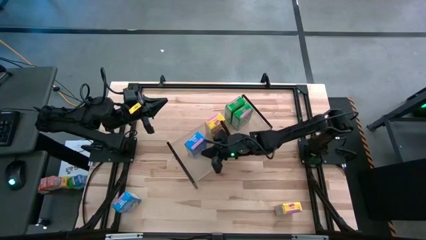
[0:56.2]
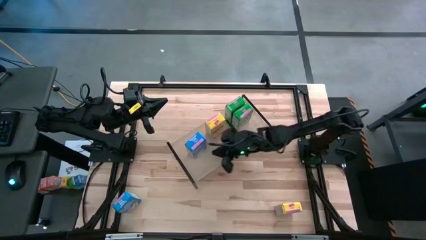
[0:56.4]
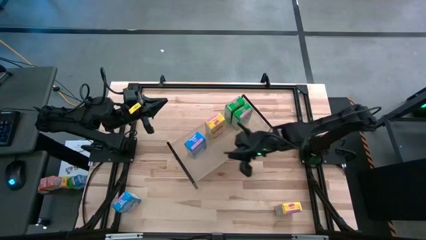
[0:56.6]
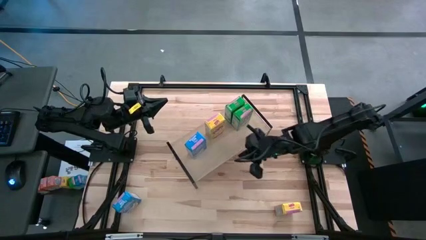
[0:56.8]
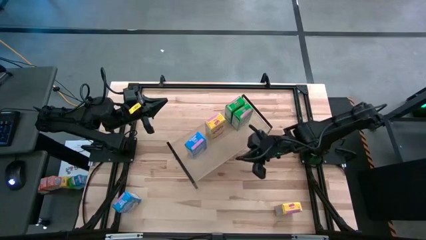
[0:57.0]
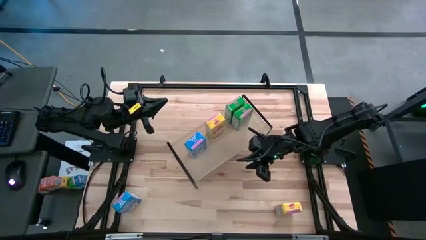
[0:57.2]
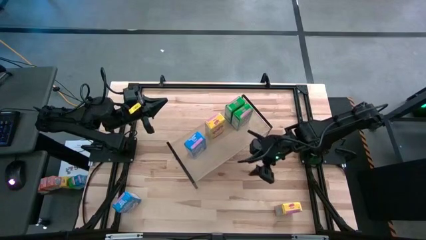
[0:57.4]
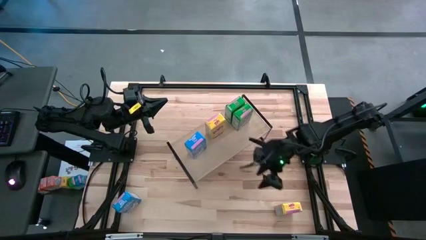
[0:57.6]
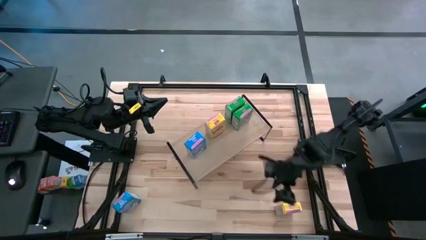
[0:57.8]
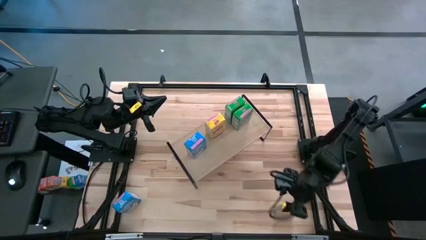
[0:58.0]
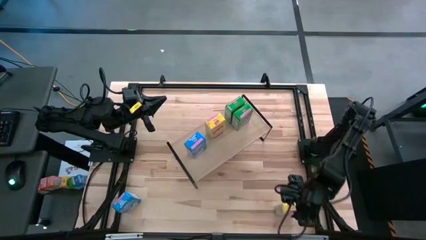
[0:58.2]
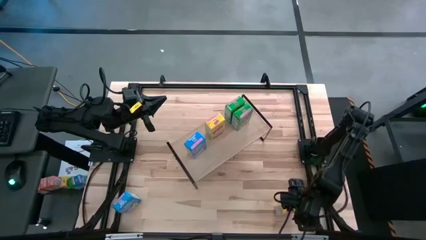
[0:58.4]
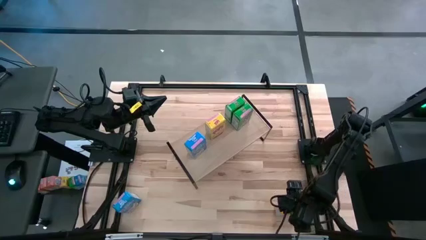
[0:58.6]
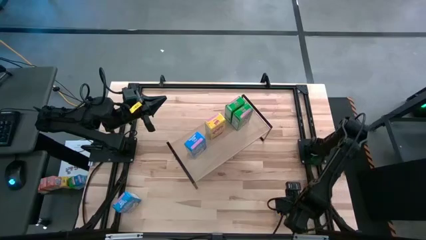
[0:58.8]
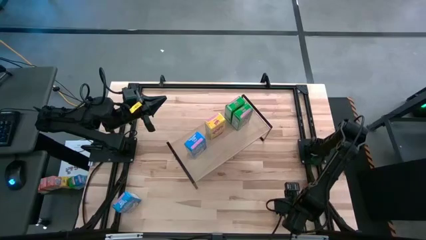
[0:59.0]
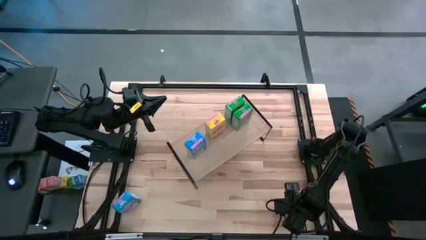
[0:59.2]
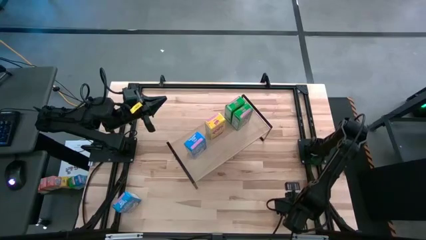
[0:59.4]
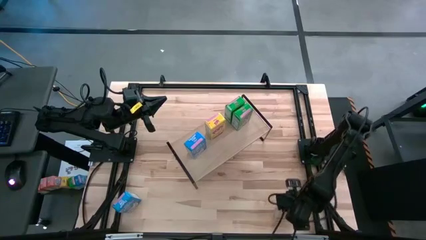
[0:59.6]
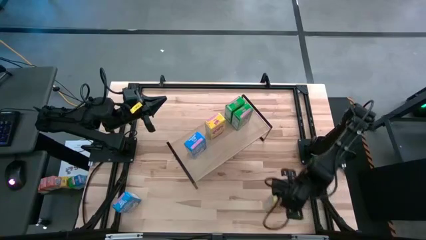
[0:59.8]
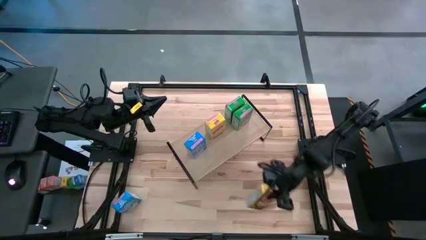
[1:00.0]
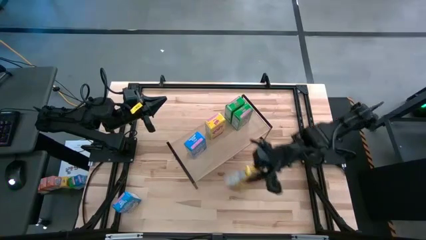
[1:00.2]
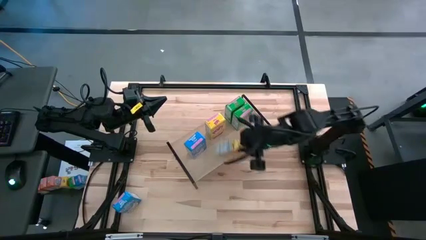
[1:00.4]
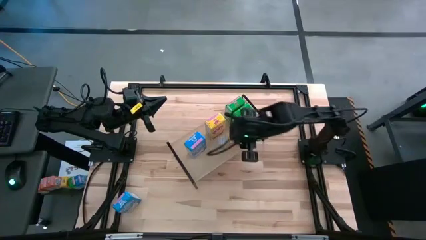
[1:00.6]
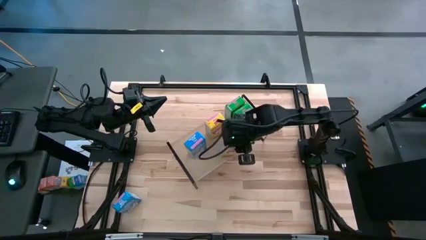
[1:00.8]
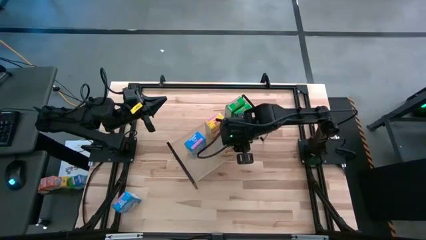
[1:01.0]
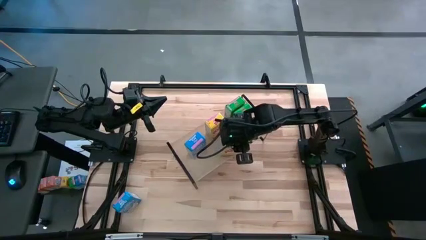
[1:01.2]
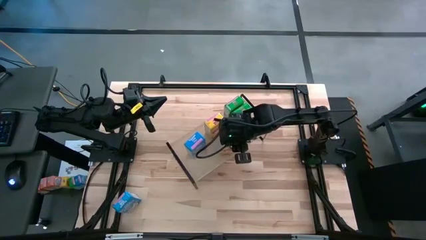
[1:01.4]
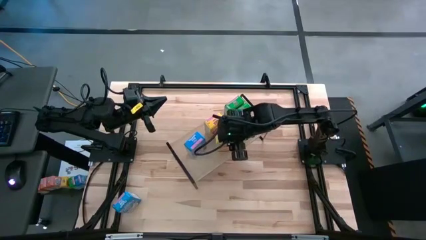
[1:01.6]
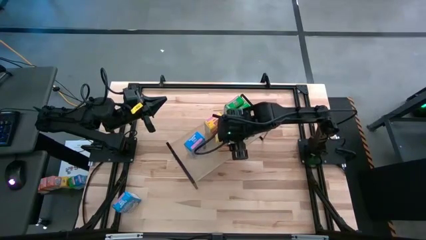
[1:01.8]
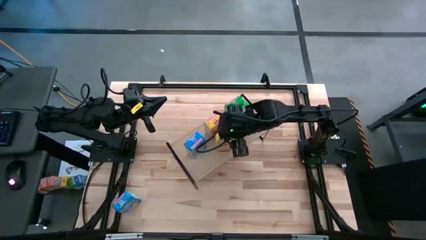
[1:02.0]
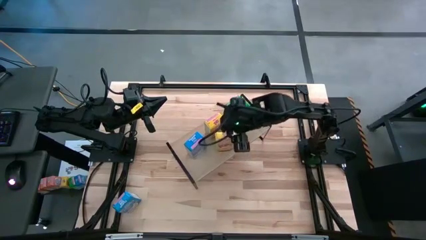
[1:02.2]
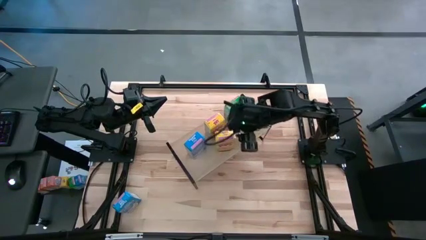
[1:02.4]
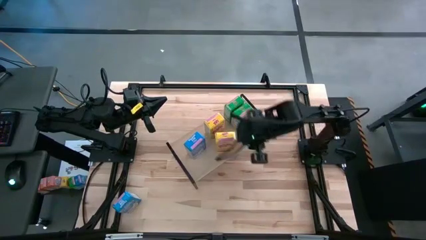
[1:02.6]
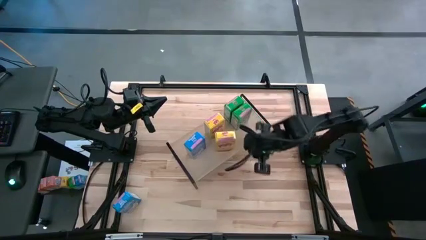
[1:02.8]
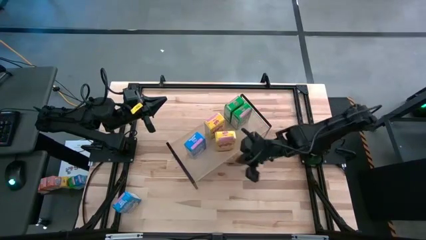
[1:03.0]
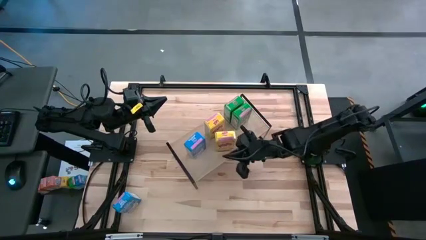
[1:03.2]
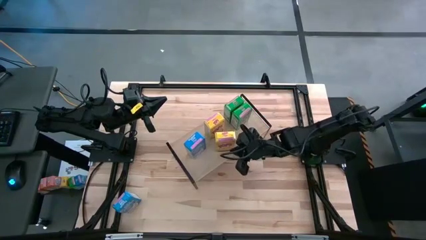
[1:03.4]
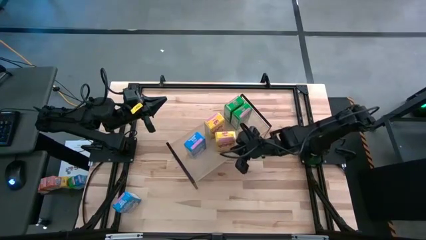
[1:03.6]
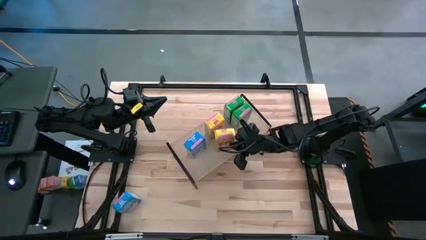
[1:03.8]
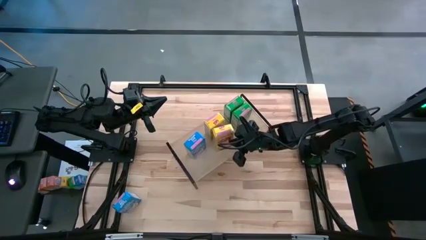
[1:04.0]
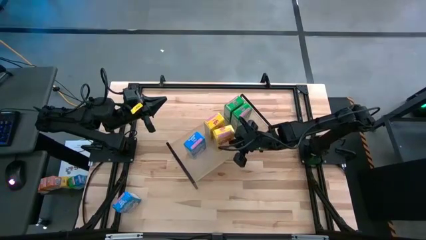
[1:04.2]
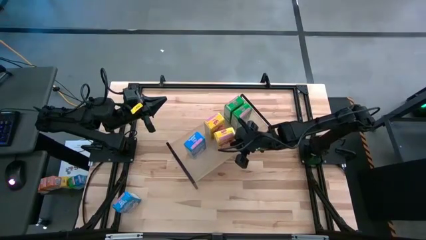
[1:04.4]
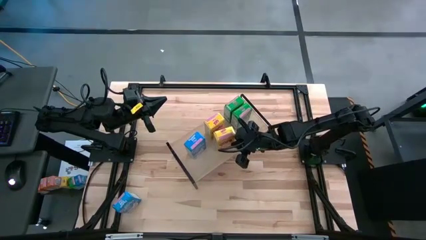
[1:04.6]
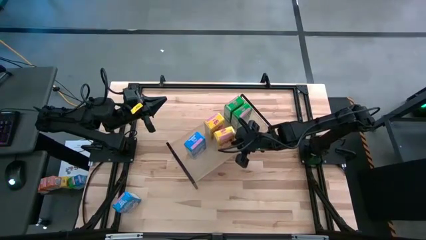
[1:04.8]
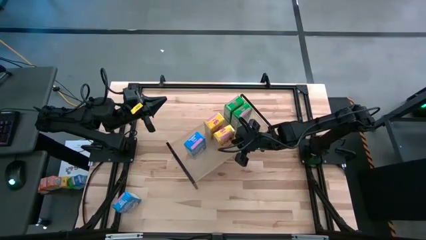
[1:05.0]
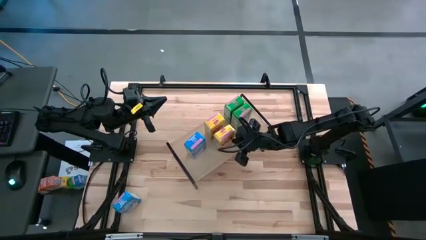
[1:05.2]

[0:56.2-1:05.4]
Task: Stack cereal on shelf
Put the yellow cereal box on the shelf align with the other yellow cereal box

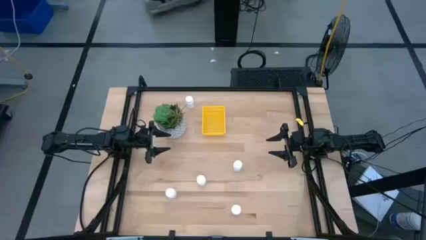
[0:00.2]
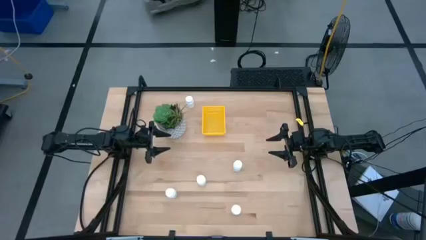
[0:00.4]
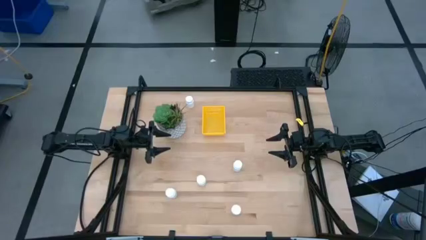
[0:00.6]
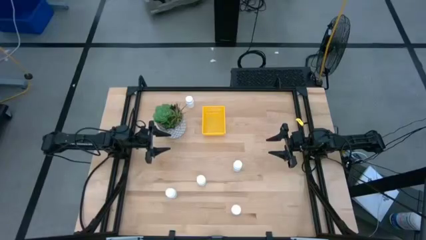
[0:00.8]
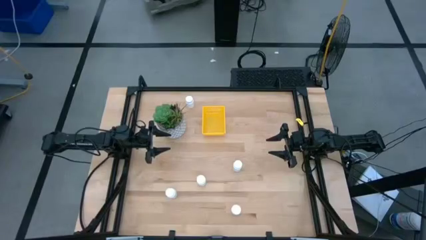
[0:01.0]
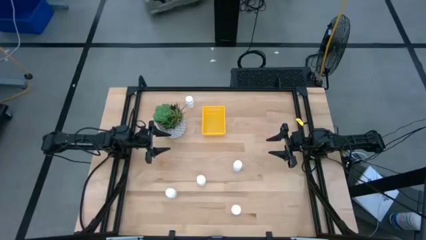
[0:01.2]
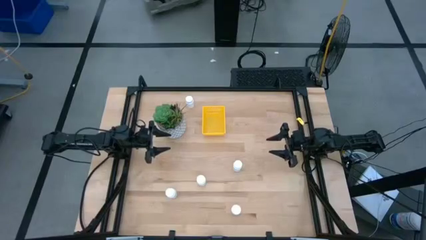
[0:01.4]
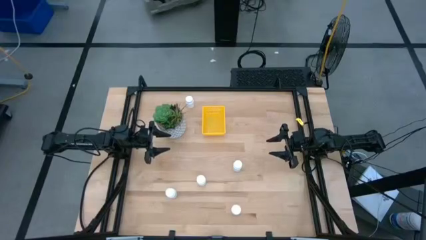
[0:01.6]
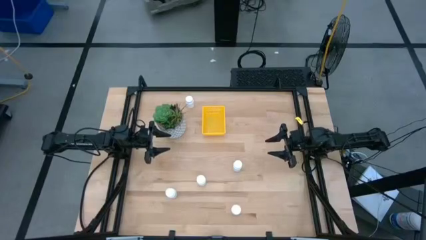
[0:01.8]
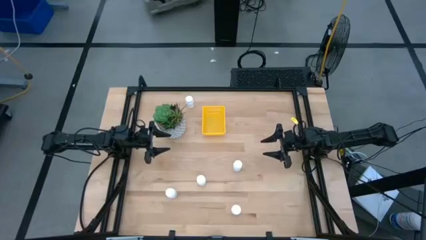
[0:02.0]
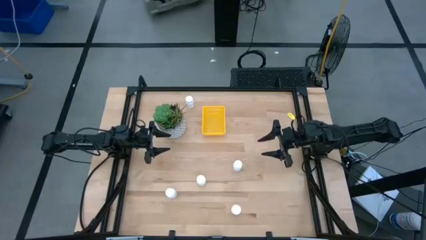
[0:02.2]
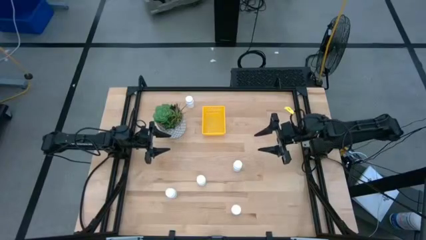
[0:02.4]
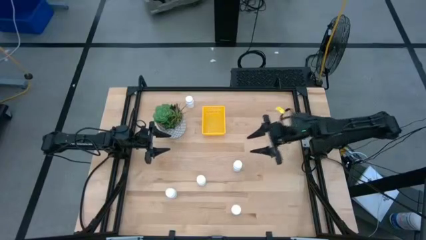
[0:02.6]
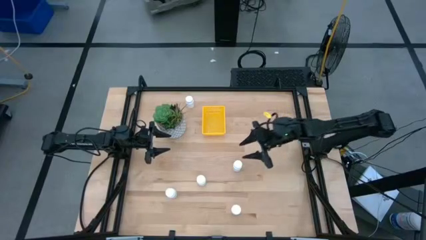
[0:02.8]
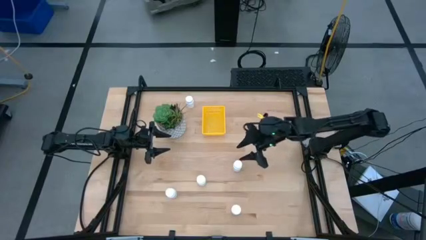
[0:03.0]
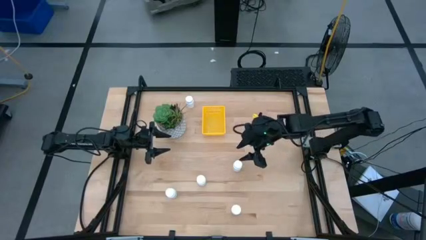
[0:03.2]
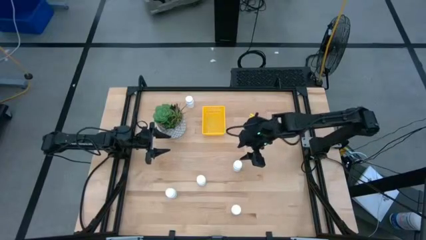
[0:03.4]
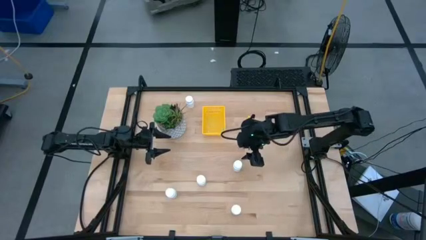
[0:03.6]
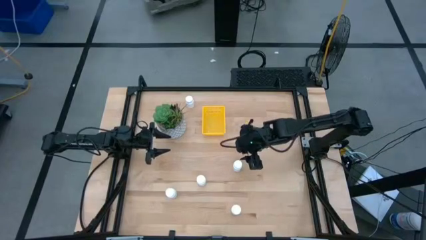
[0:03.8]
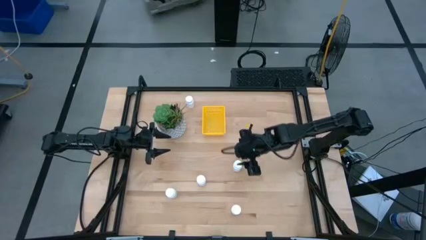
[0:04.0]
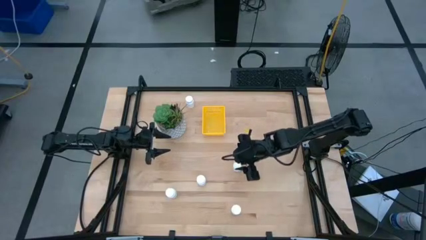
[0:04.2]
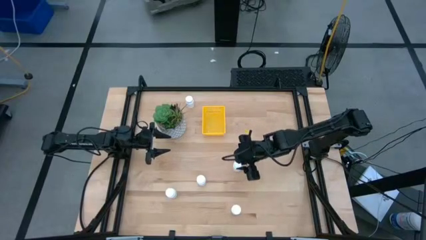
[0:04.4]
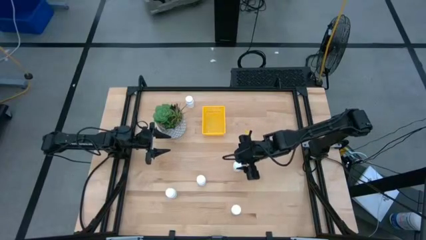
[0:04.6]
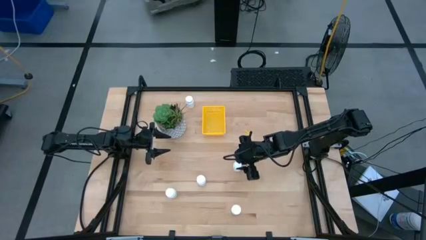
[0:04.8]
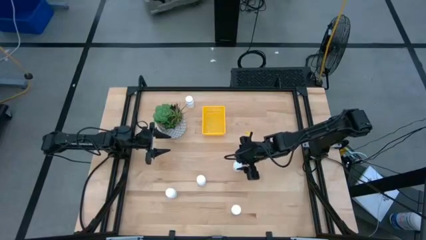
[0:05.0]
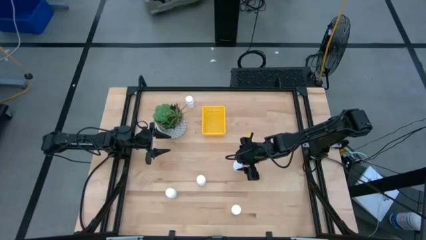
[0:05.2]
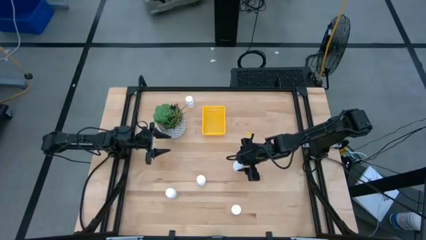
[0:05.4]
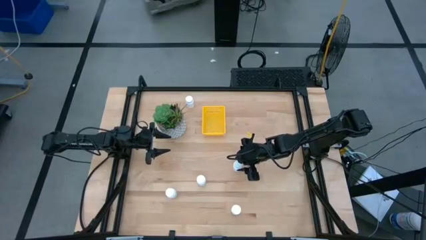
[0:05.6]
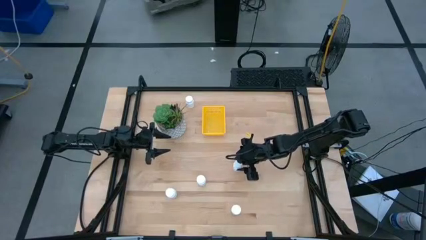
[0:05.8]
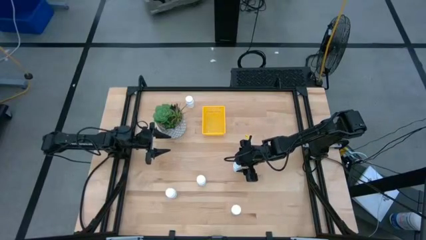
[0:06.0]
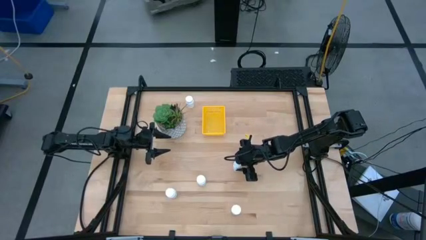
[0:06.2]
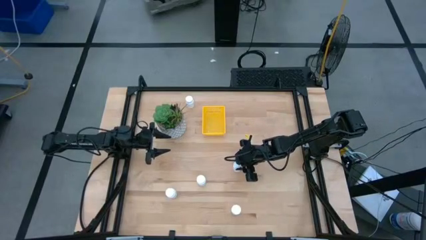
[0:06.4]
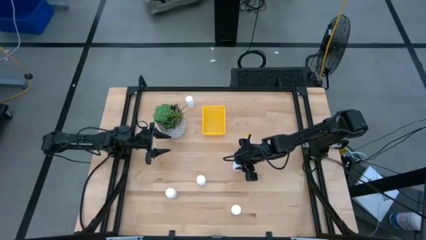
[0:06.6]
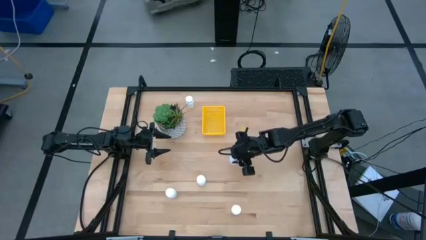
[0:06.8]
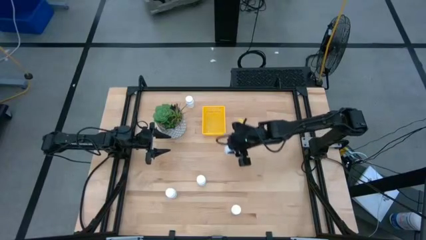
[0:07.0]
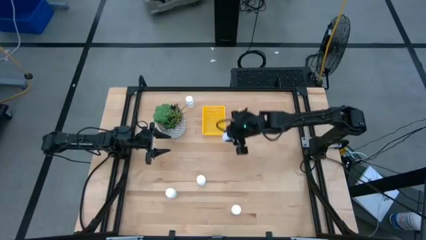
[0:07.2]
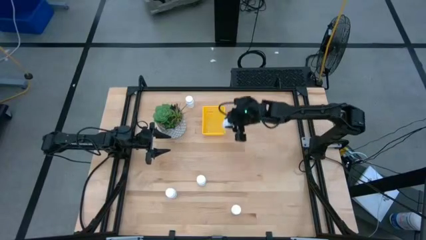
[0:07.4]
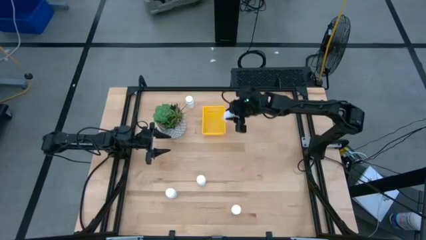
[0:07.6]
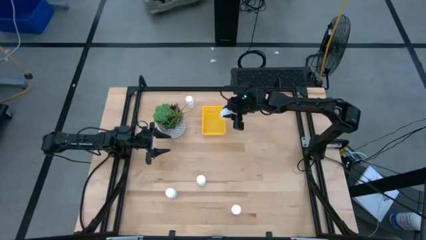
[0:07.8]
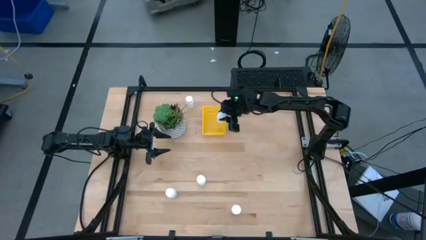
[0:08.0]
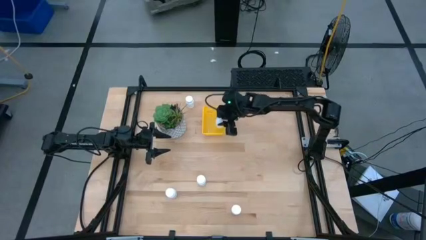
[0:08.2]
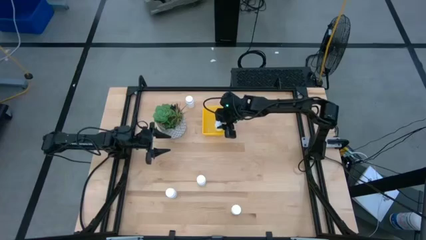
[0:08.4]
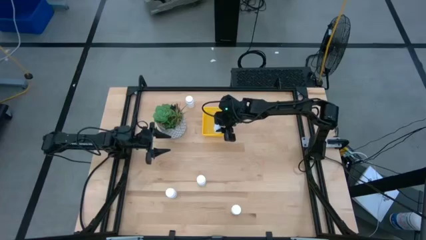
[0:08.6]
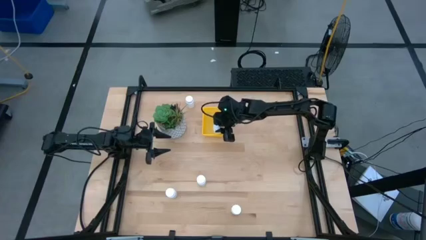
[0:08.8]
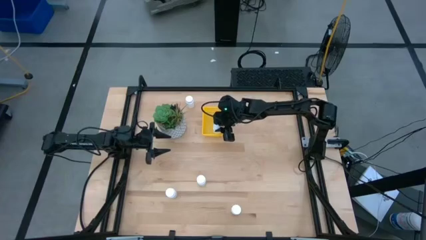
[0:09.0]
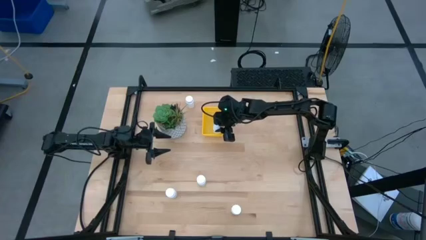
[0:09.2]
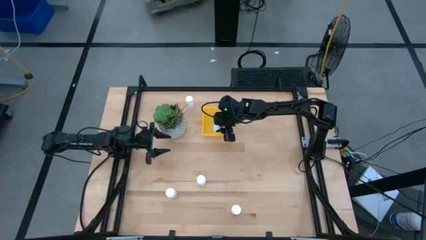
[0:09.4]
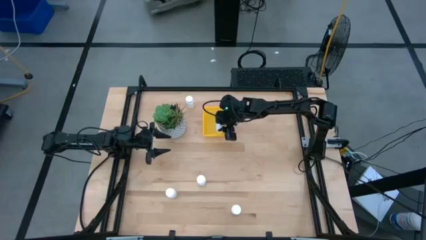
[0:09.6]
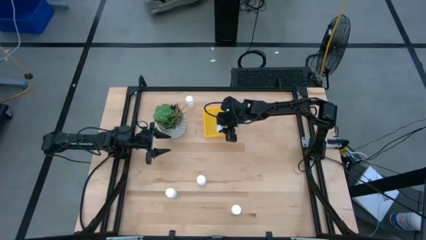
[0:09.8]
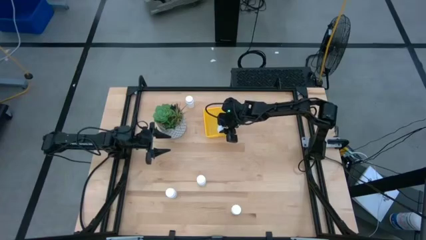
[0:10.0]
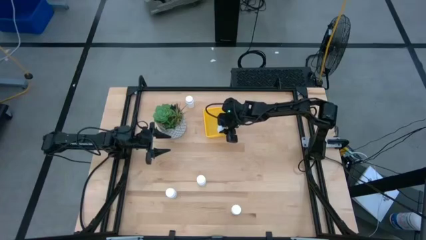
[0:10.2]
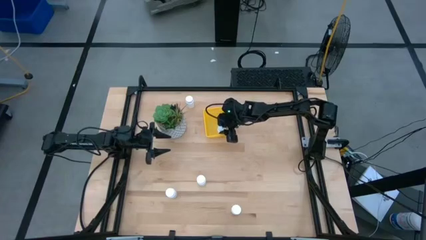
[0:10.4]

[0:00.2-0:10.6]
Task: Pick and place pill bottles into a basket
Put the white pill bottle into the yellow bin
